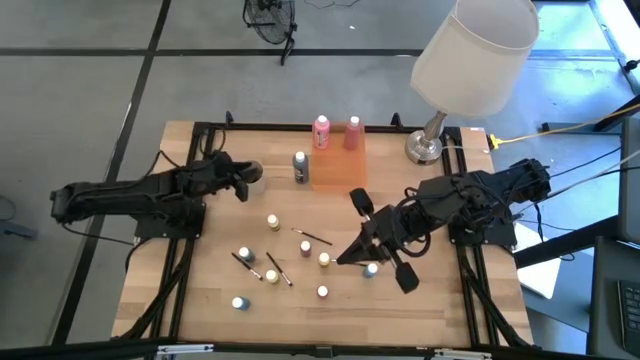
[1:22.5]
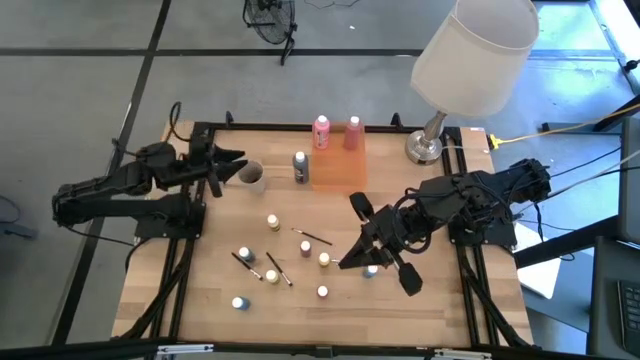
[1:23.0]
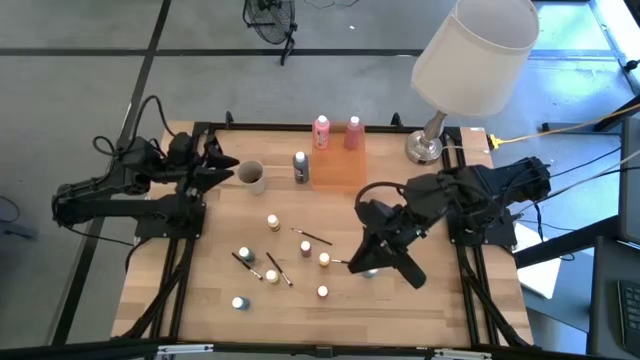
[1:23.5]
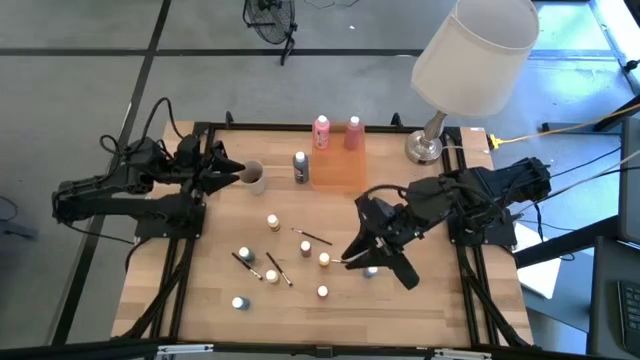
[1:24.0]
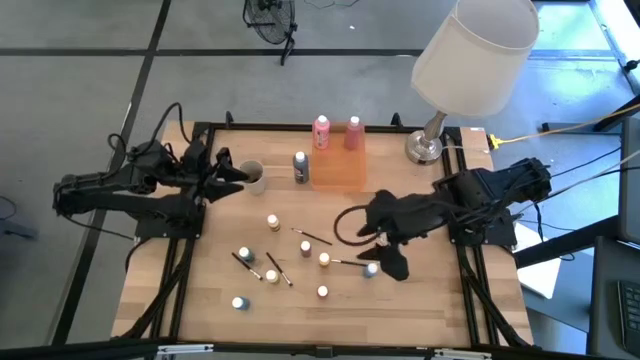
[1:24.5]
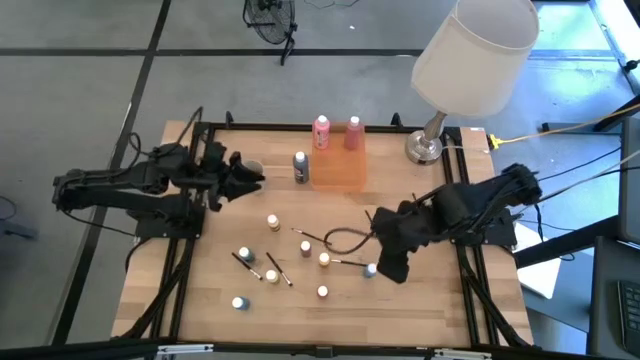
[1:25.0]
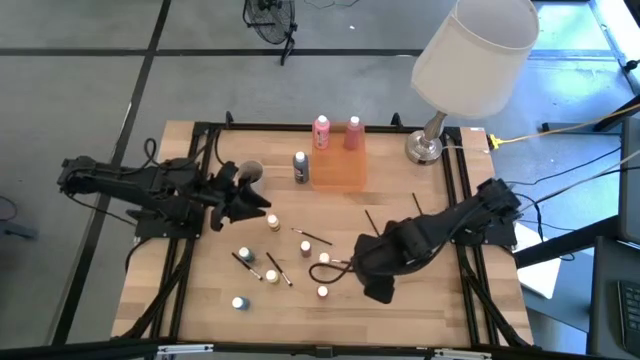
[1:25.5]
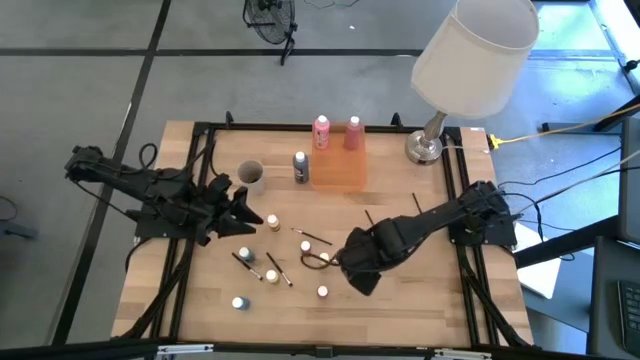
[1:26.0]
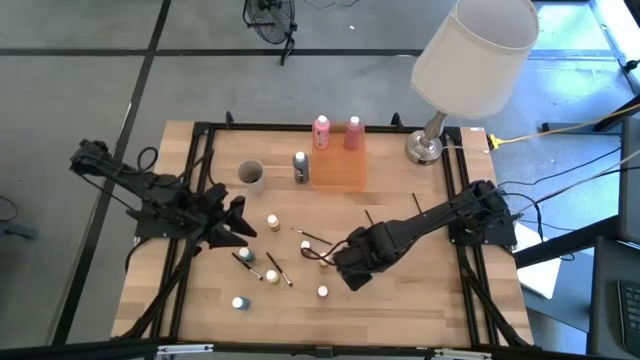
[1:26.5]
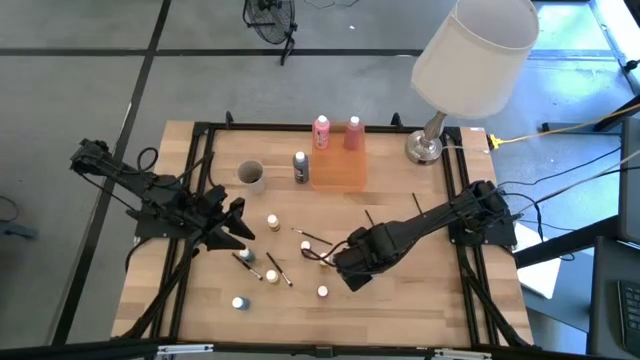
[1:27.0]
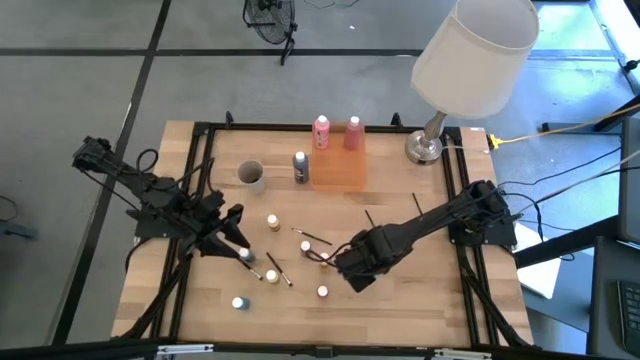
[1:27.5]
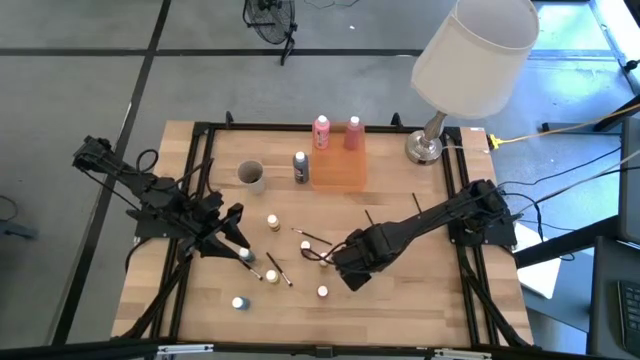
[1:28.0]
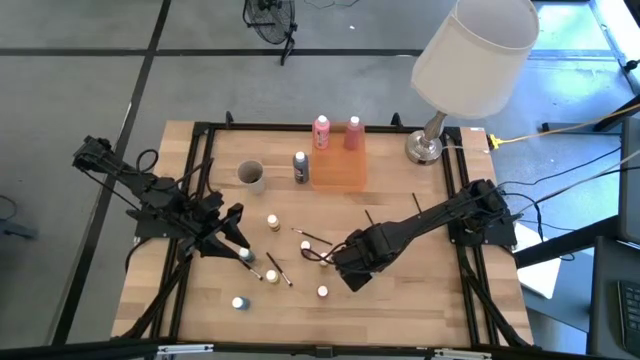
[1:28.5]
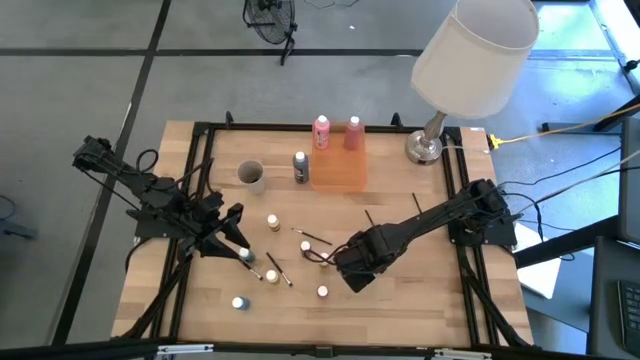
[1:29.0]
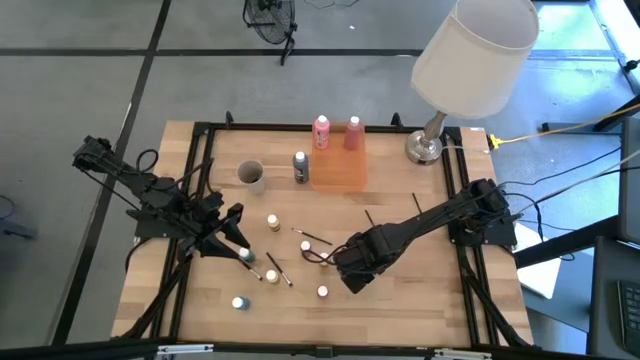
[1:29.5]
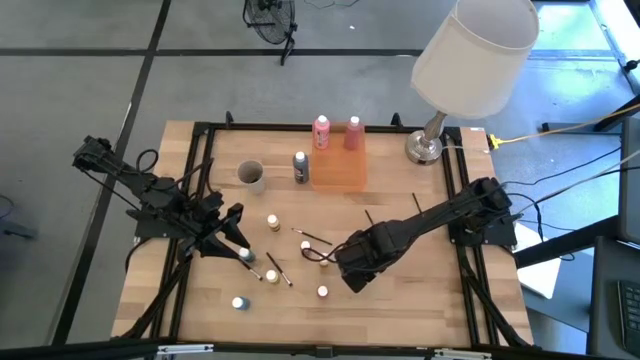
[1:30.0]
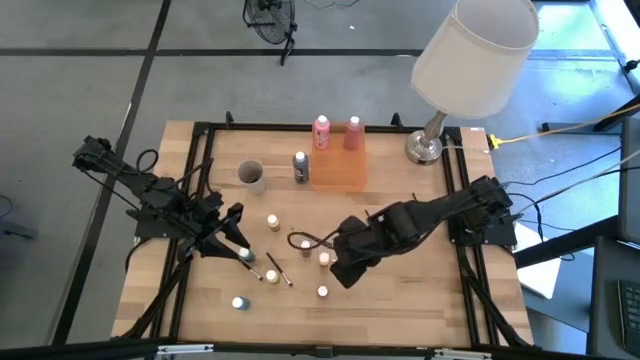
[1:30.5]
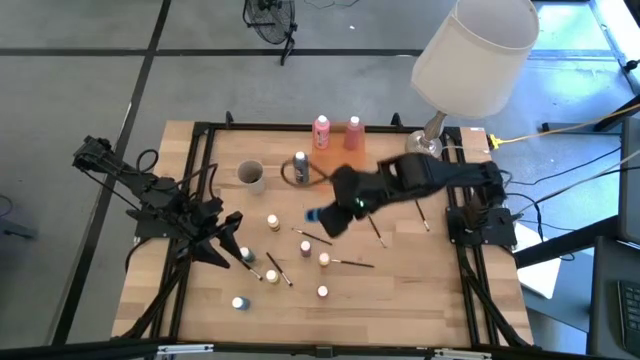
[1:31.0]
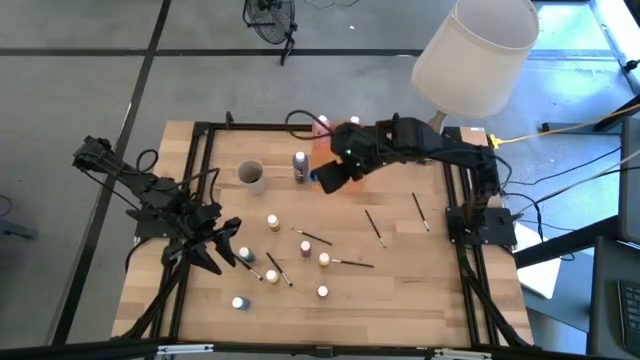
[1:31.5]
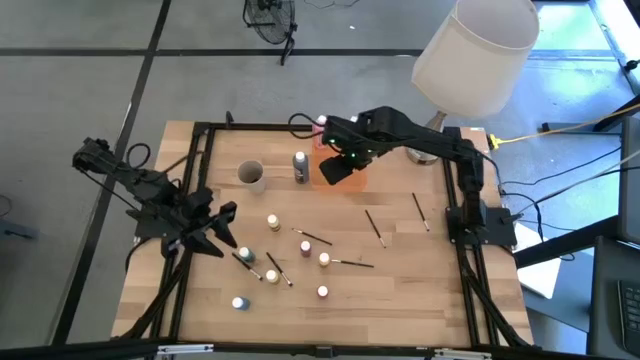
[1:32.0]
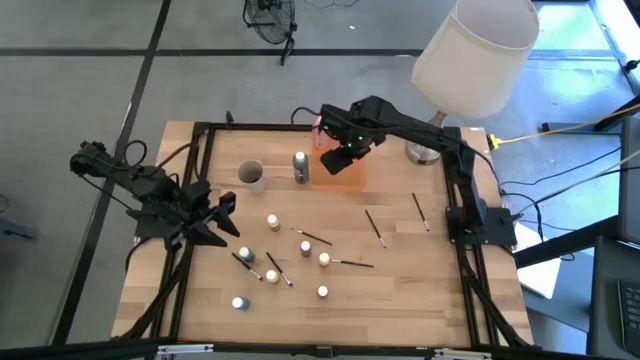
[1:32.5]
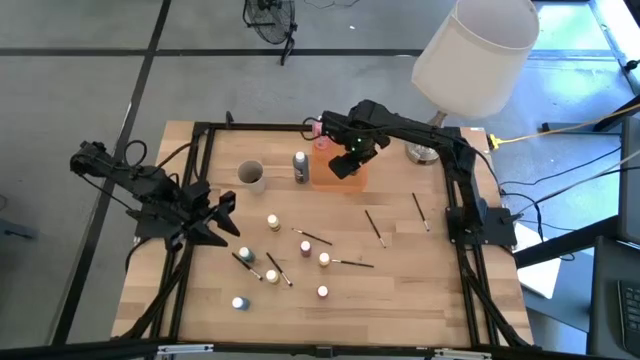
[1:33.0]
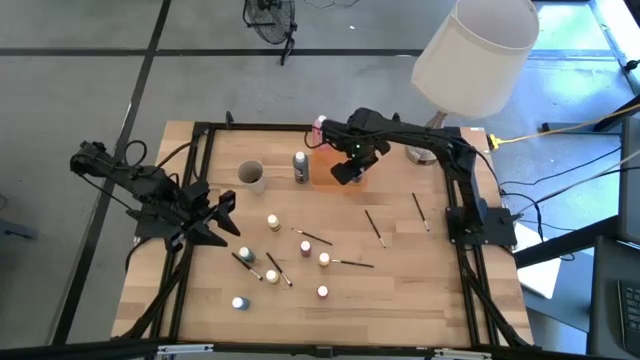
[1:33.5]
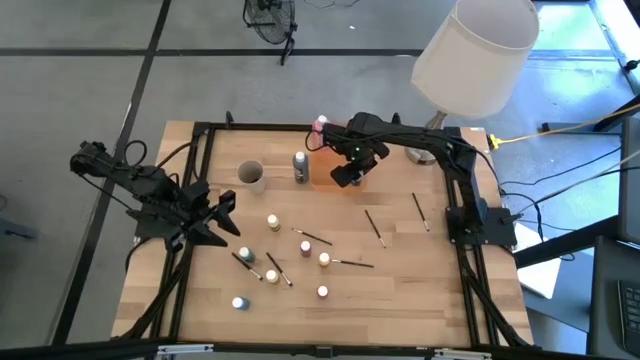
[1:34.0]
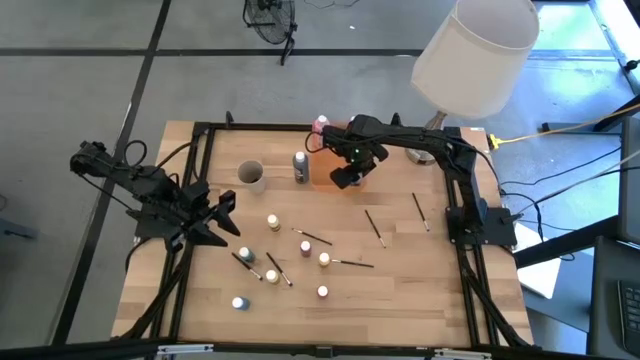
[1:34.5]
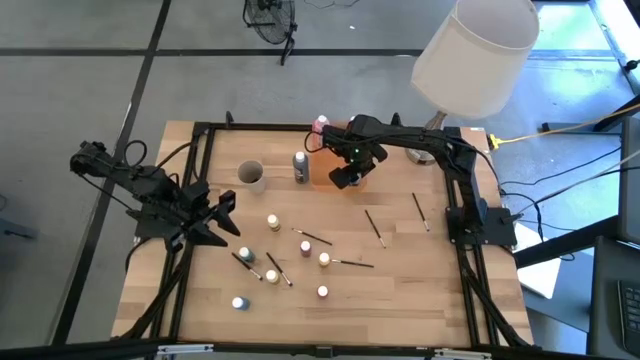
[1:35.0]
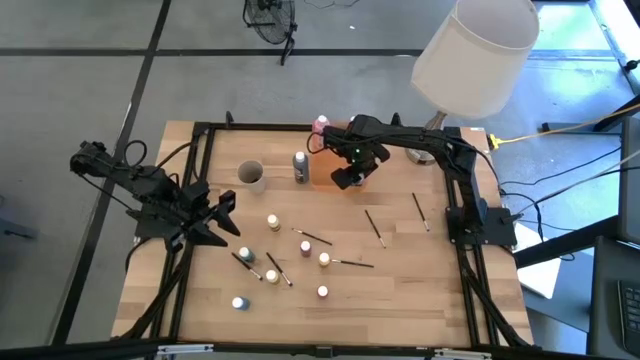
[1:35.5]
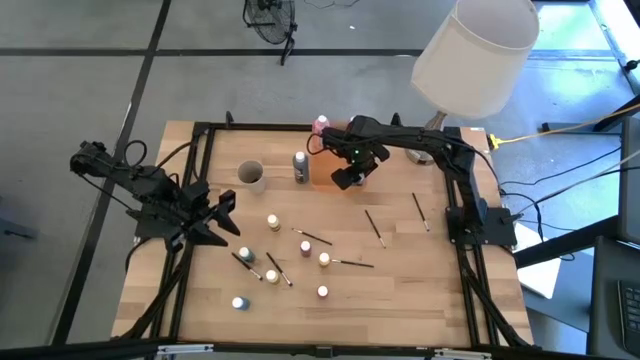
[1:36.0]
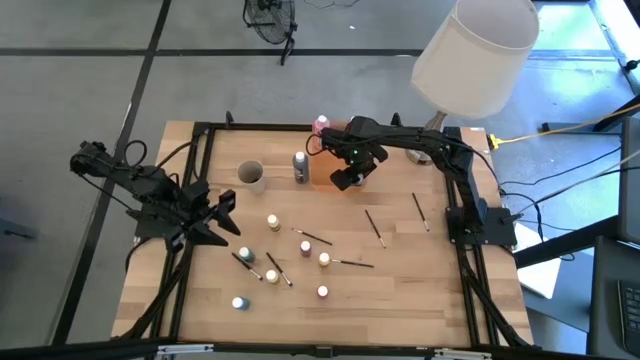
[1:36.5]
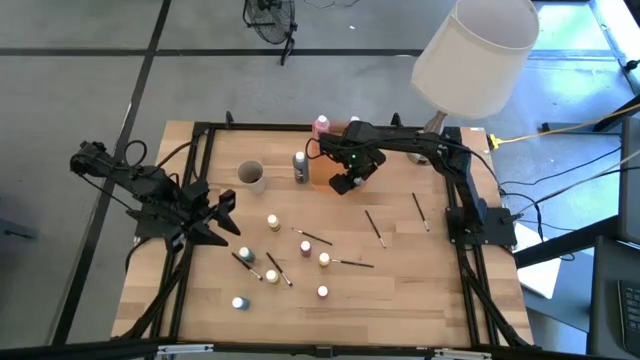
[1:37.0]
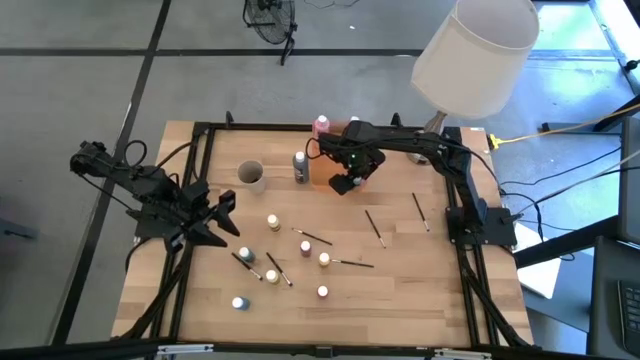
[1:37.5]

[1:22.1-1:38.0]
Task: Pick & Place Paint Supplies
Put the right small blue paint bottle into the orange bin

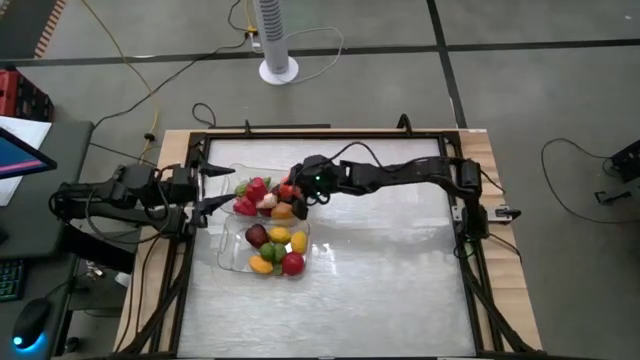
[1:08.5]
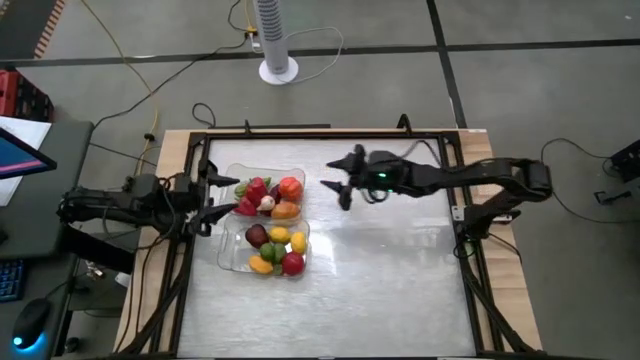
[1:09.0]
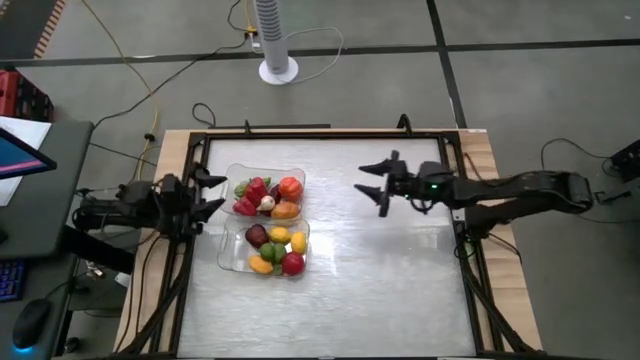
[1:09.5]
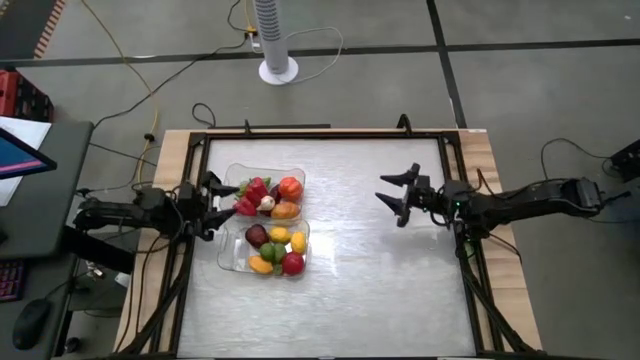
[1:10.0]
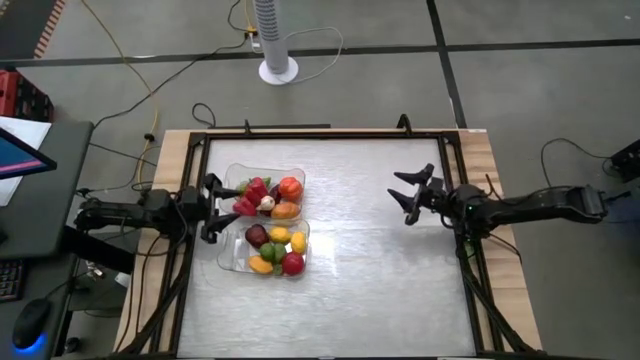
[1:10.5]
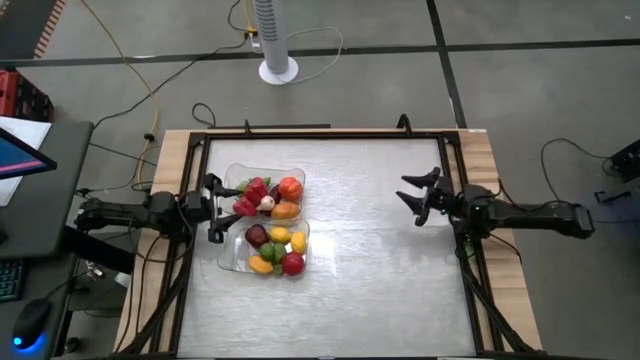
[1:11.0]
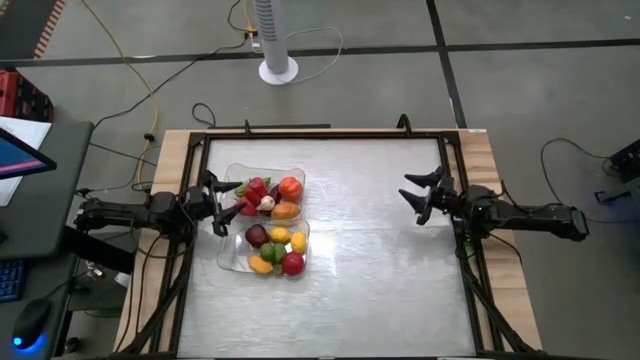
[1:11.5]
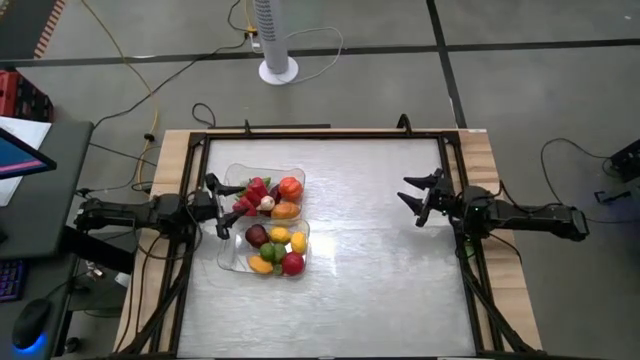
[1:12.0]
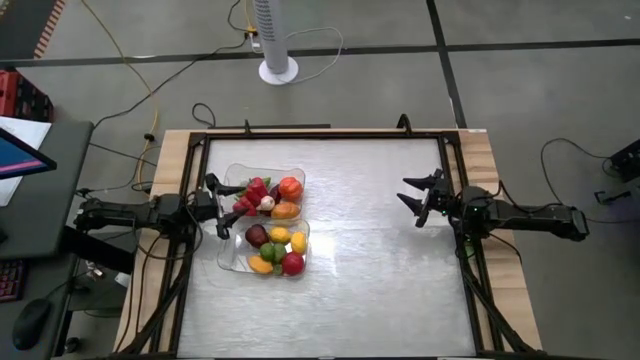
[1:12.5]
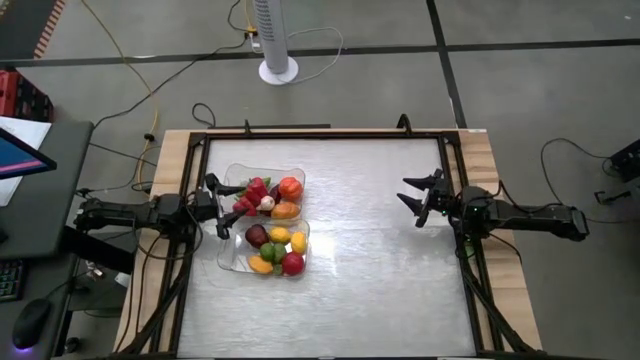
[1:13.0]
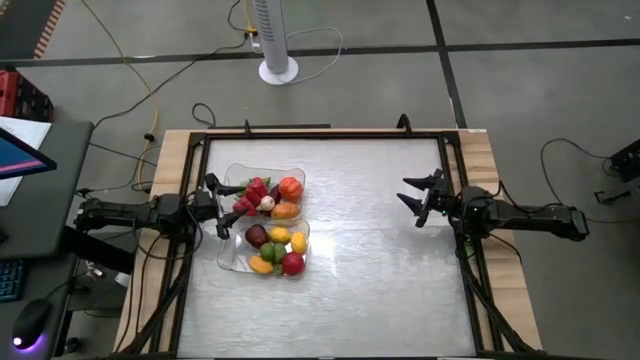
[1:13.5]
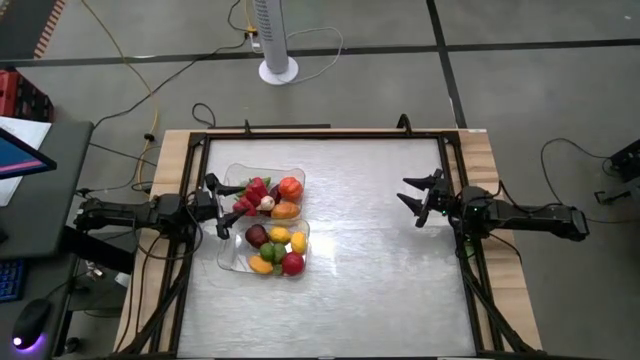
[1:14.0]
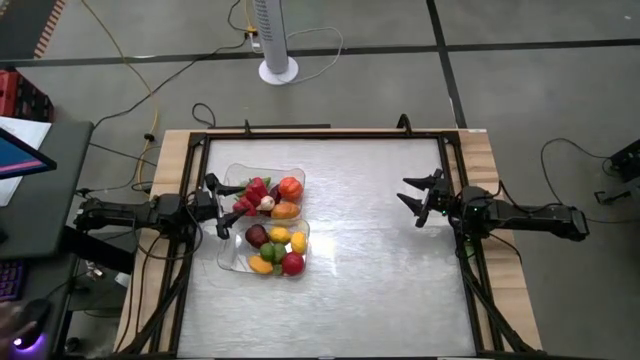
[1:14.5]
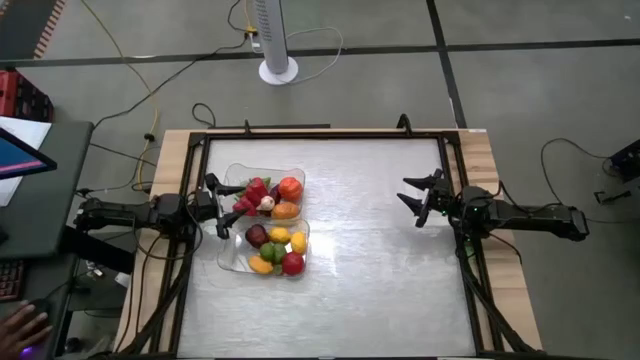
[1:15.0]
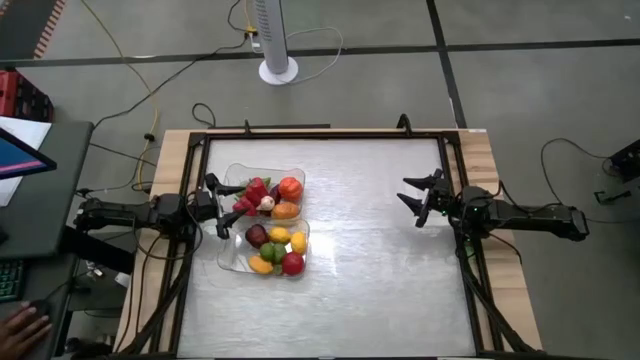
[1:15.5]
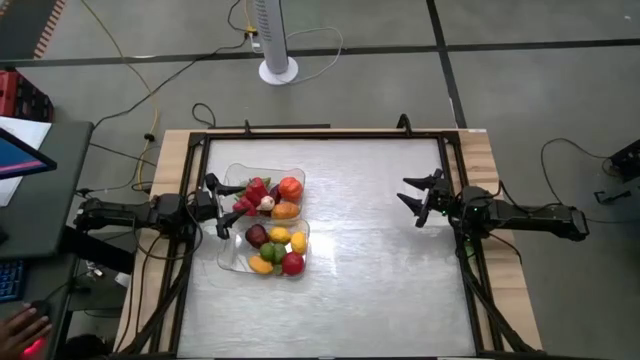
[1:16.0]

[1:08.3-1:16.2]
Task: Sort produce into baskets
Return to Home Position
